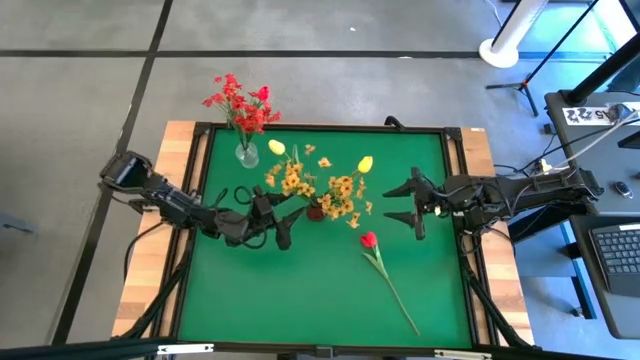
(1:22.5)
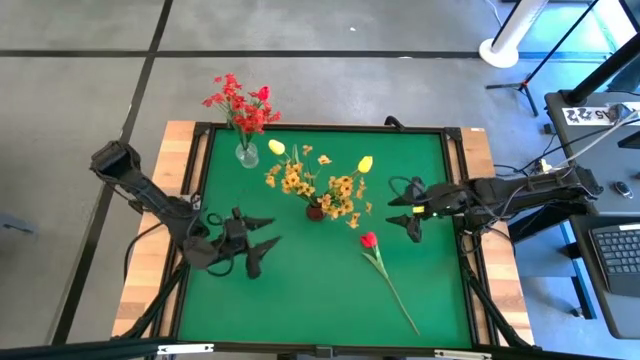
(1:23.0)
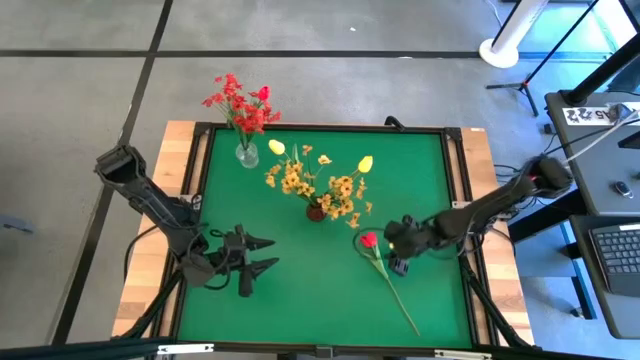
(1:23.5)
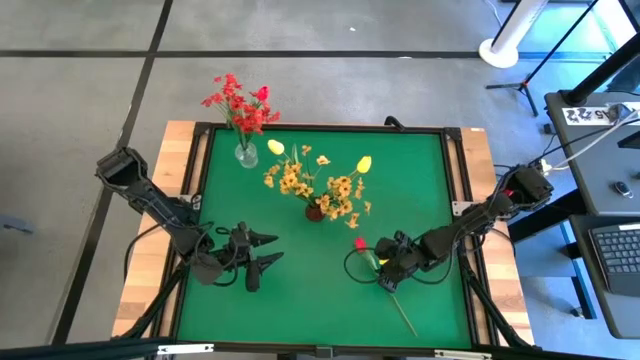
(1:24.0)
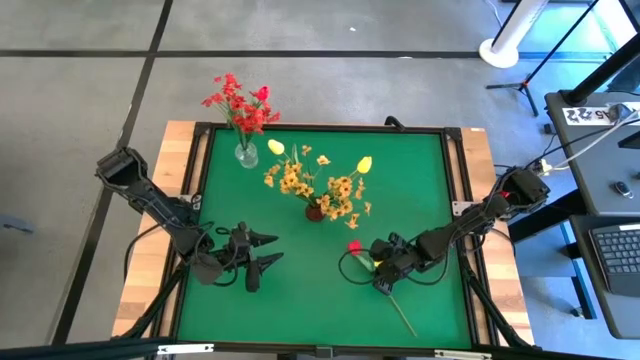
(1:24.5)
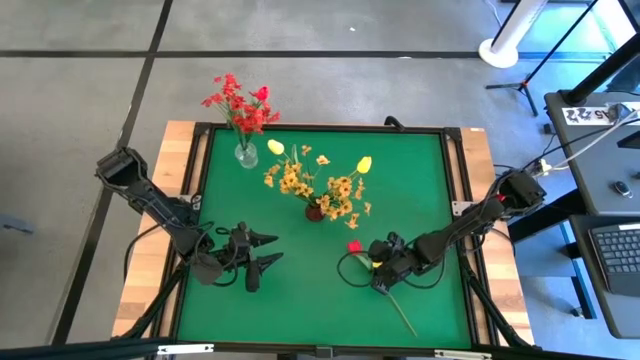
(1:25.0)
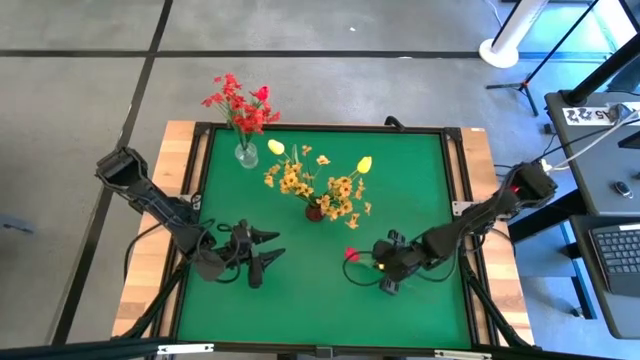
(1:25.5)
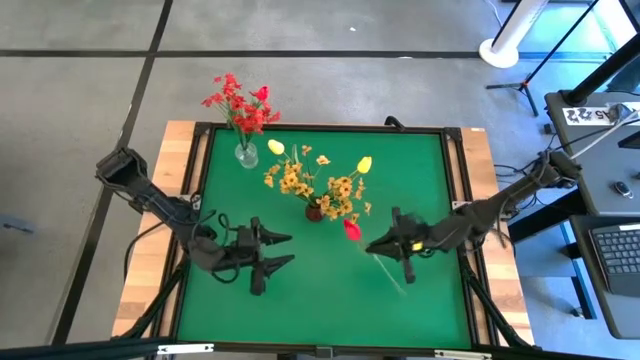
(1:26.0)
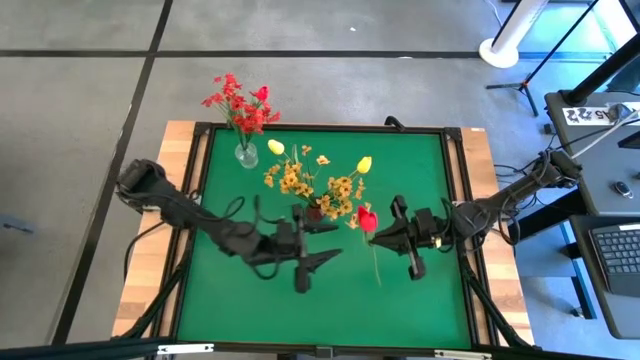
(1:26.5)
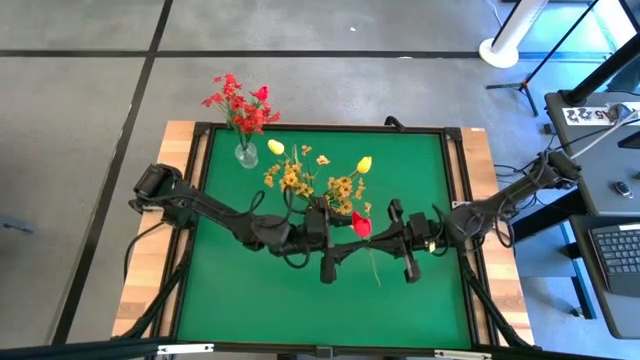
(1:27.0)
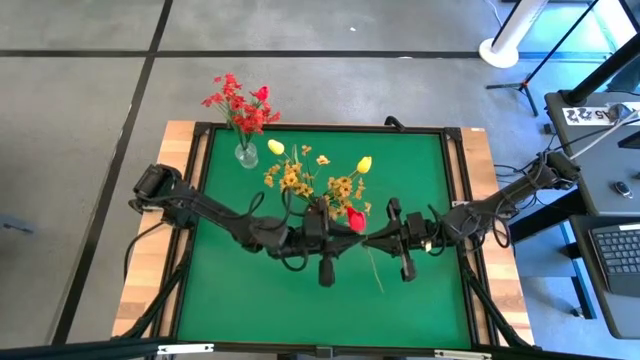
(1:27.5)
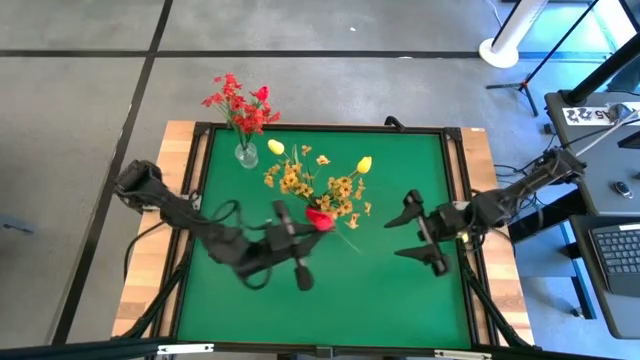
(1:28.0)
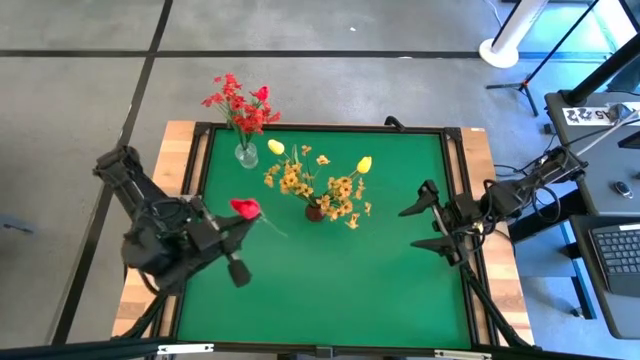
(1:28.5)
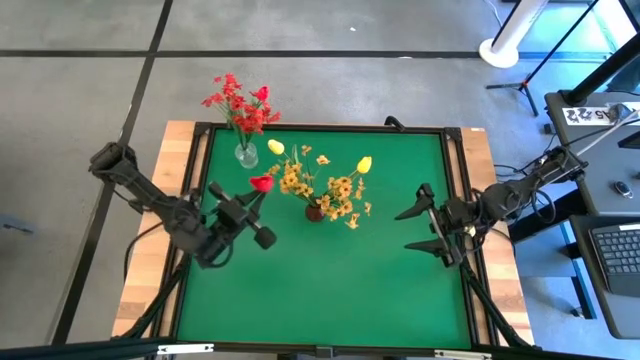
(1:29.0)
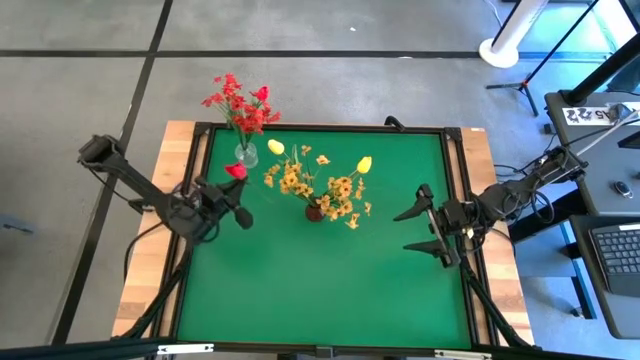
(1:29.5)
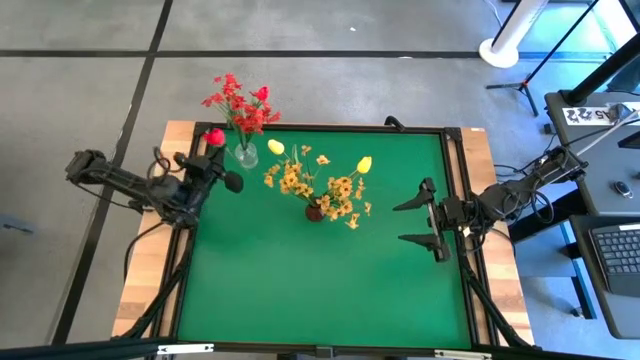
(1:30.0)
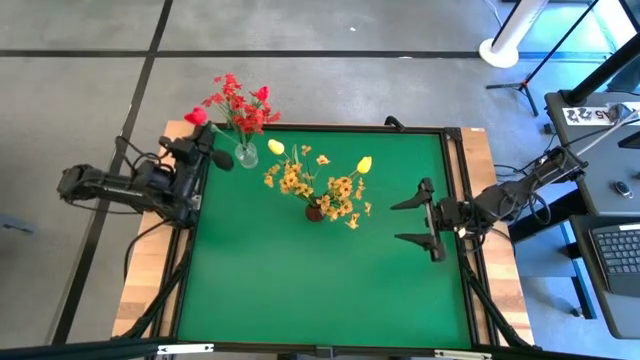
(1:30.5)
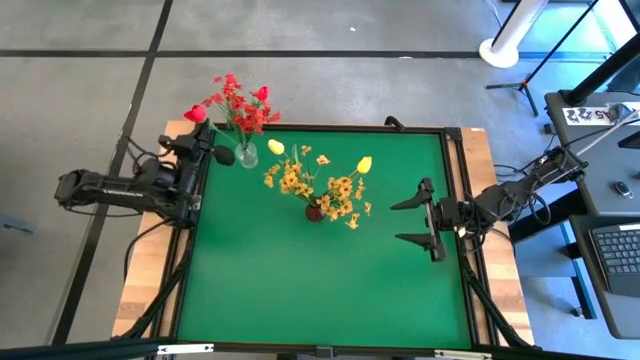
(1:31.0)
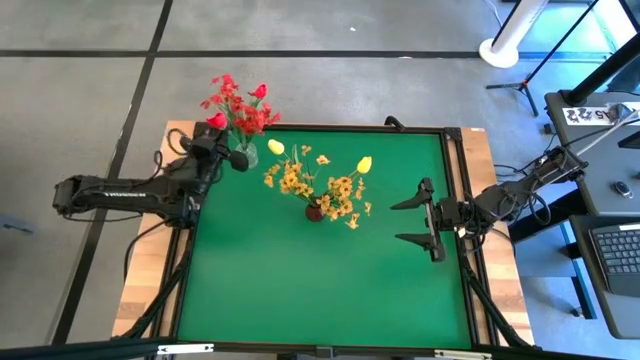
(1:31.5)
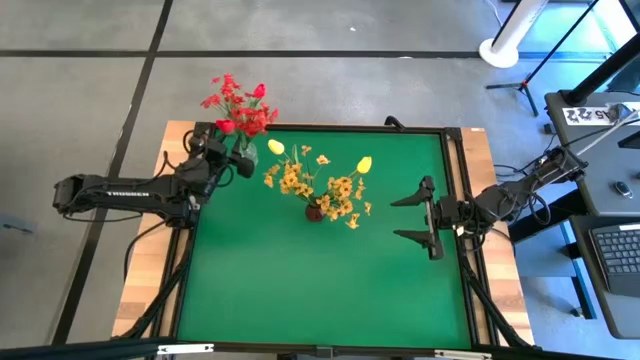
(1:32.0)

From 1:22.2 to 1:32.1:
Task: Sort flowers into vase by color
Put the red tulip into the transparent flower vase

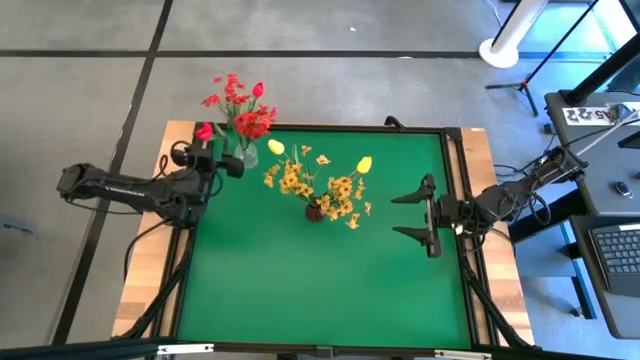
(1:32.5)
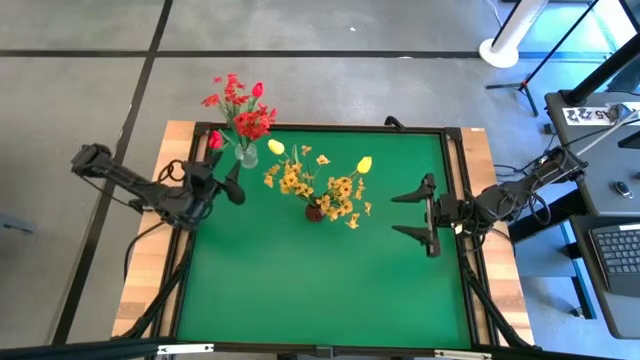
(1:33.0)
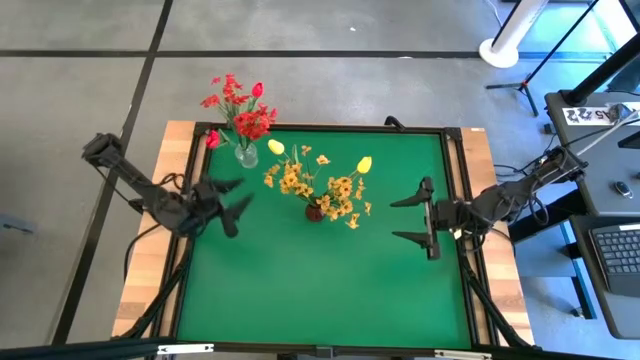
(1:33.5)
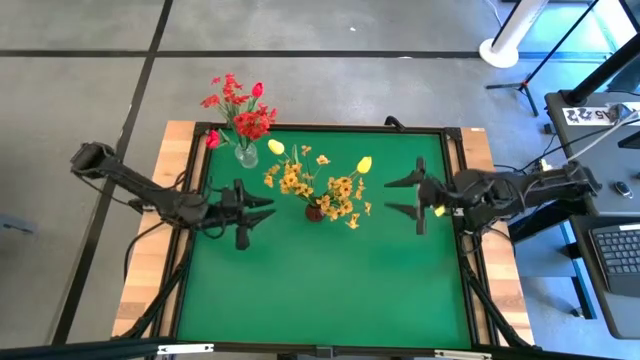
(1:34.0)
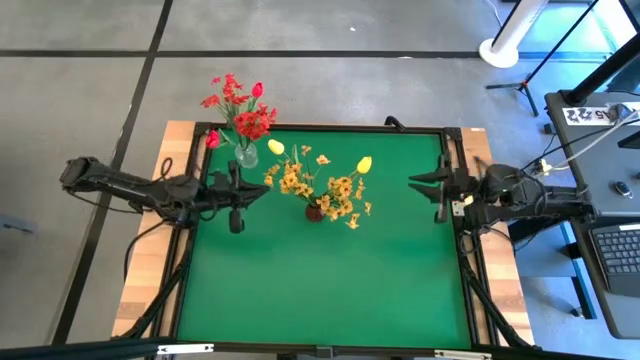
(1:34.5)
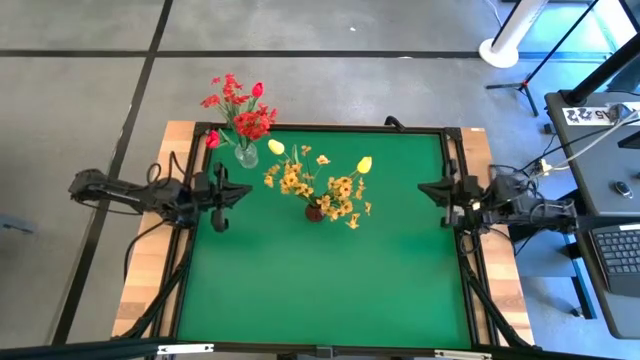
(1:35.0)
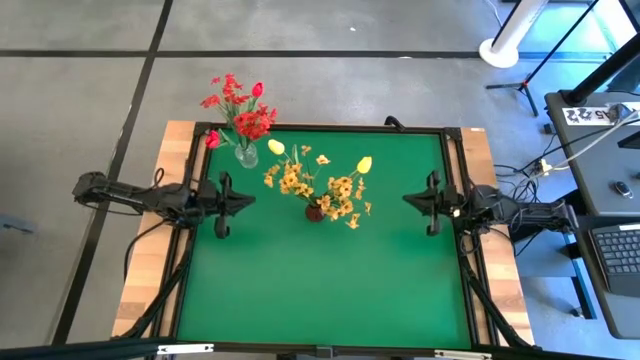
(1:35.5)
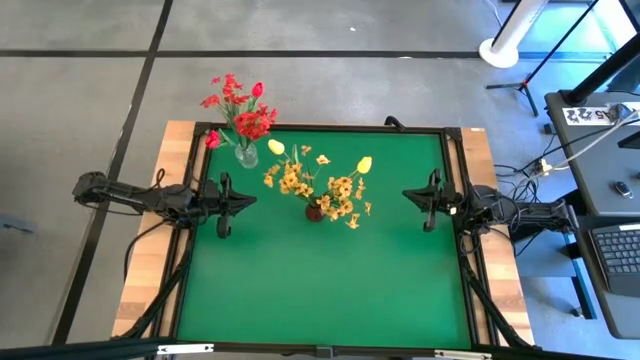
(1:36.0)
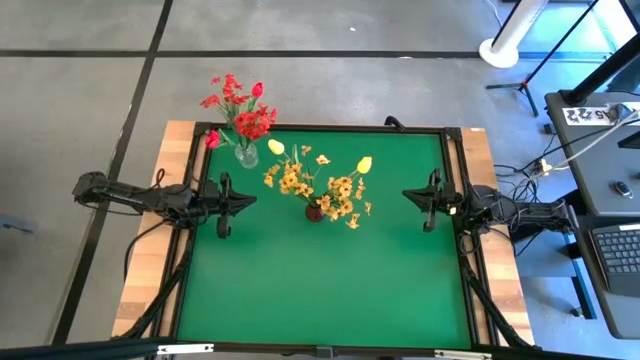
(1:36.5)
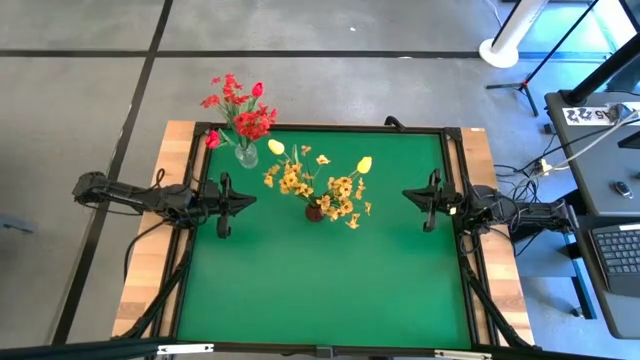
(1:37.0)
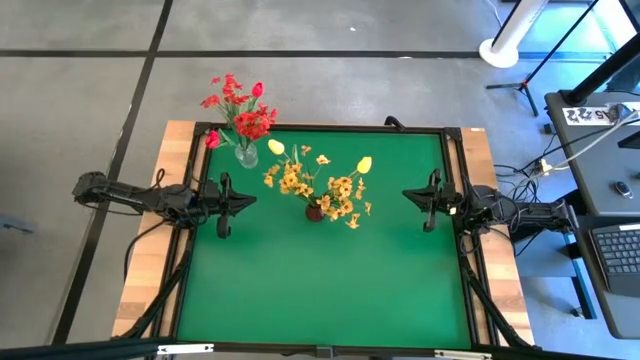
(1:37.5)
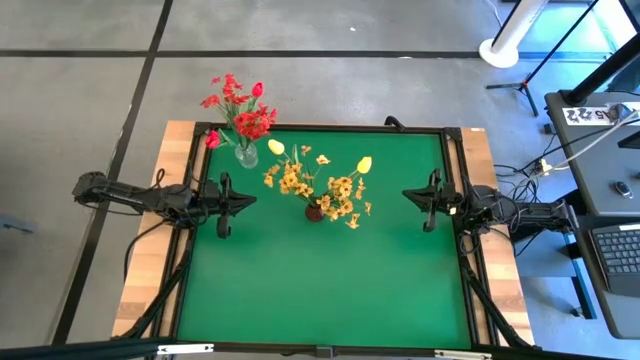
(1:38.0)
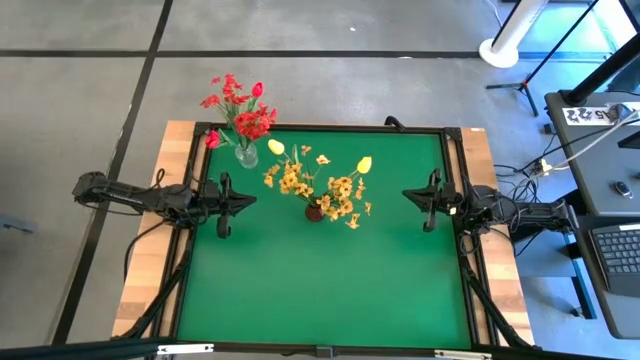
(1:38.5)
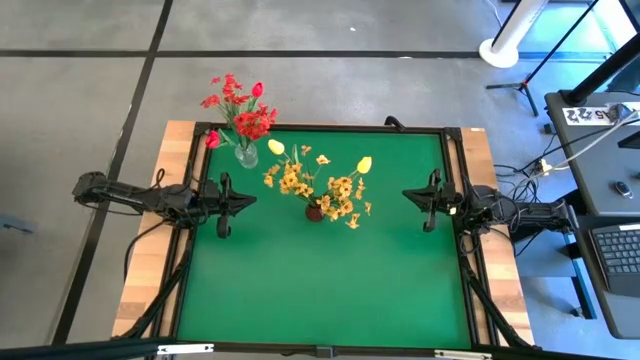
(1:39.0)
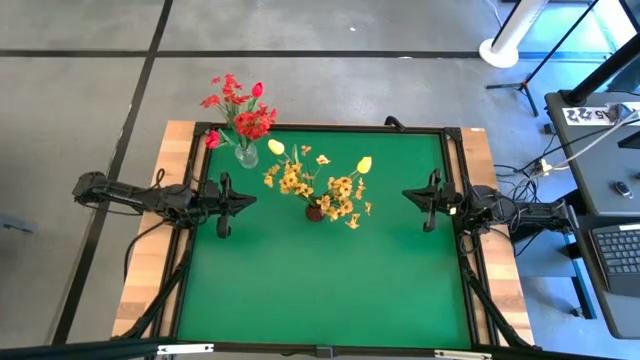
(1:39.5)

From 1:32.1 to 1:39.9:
Return to Home Position

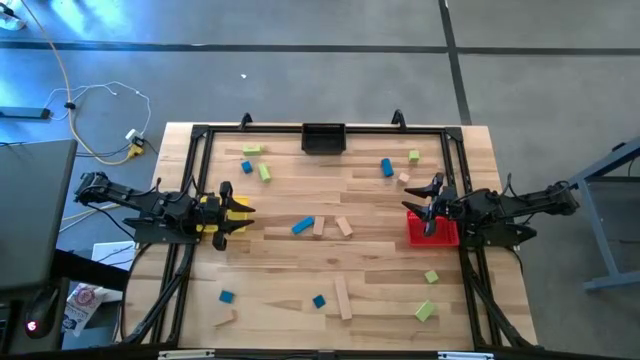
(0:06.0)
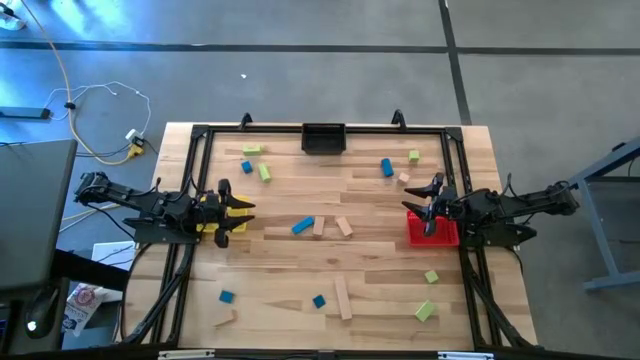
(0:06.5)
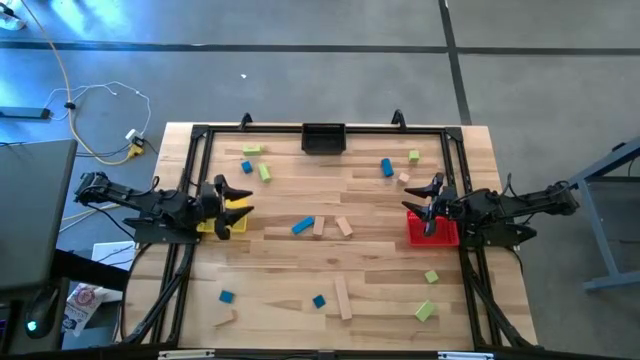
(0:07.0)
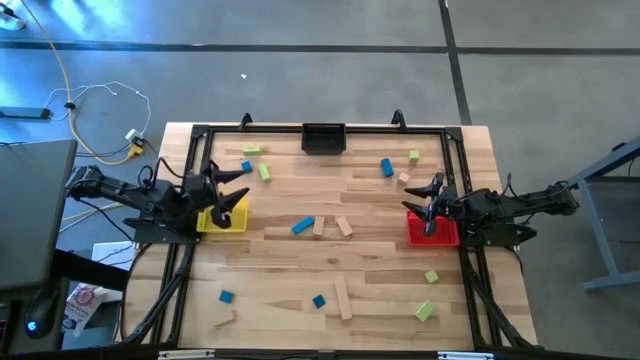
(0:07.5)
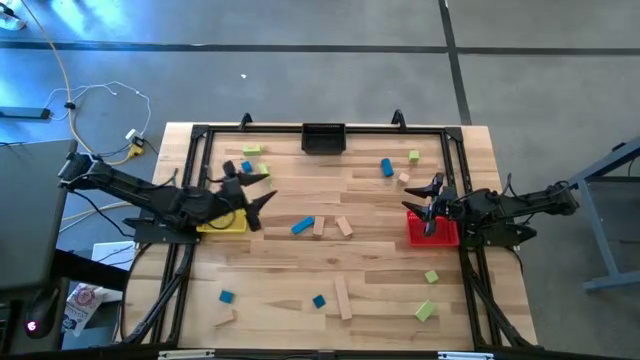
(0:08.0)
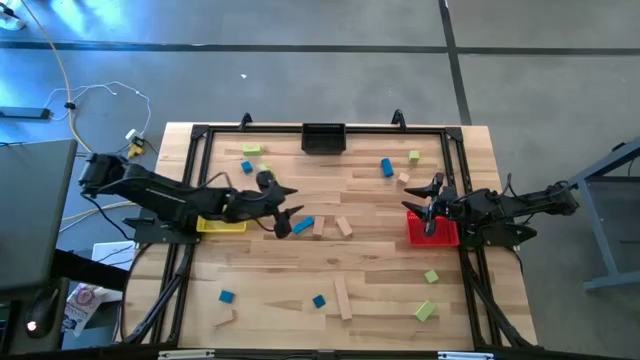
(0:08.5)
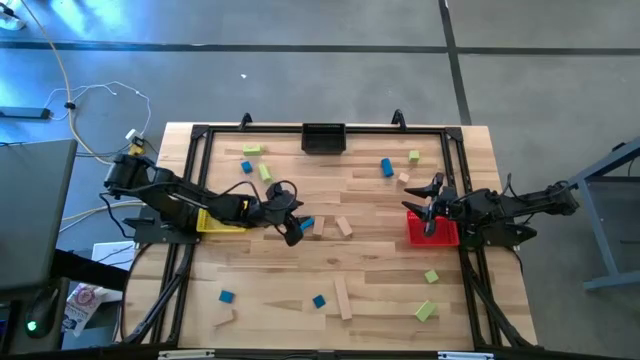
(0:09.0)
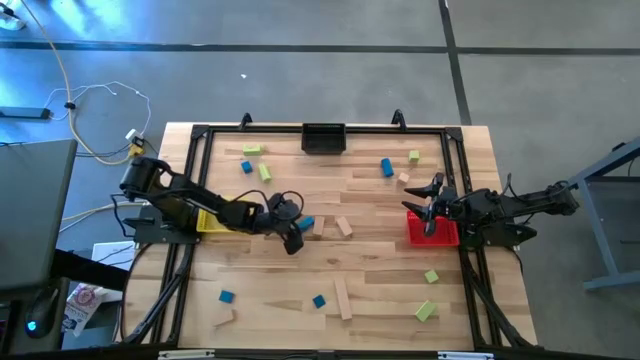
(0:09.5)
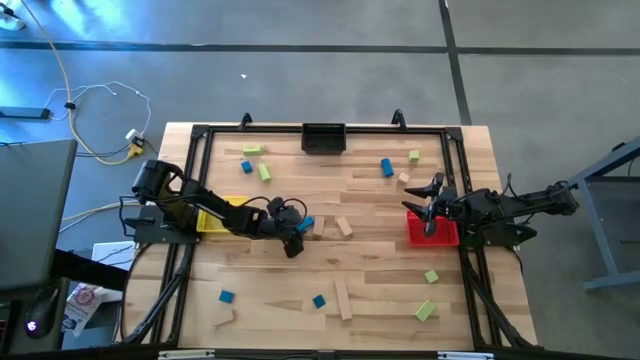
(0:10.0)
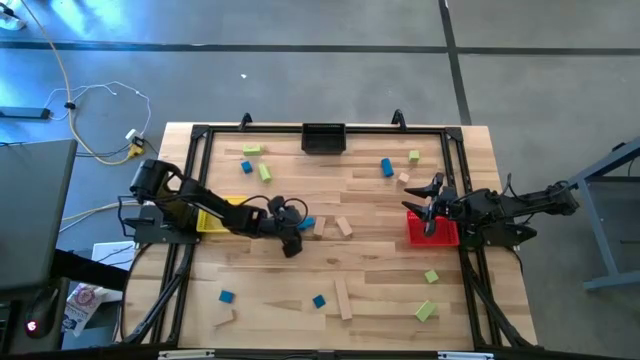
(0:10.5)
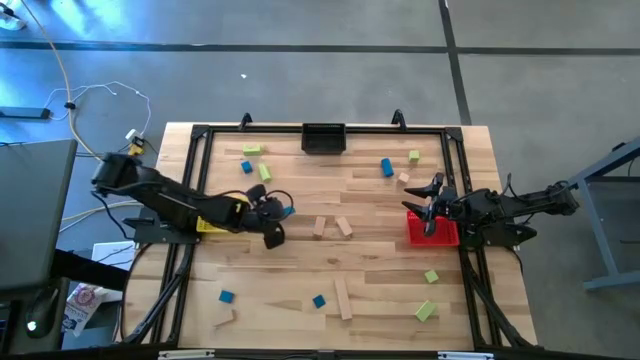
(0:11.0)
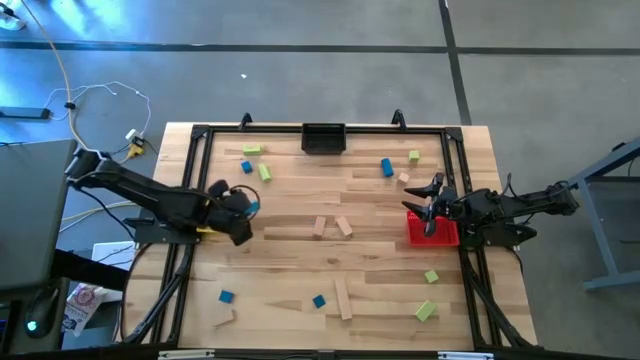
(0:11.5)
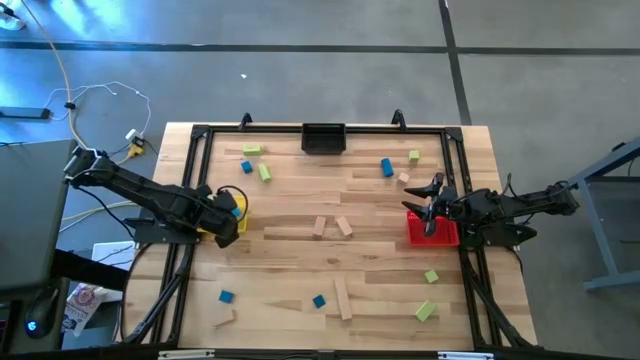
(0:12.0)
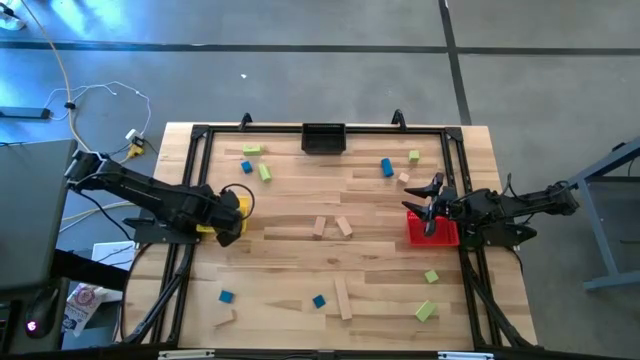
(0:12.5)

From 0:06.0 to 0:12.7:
Task: Sort & place blocks by color
Put the blue block into the yellow bin
